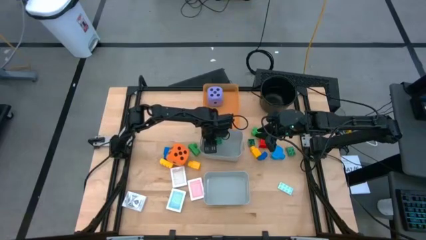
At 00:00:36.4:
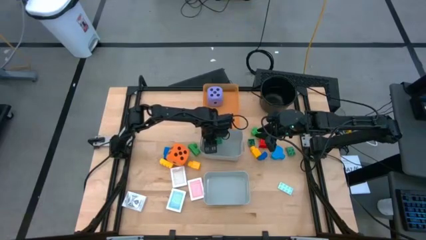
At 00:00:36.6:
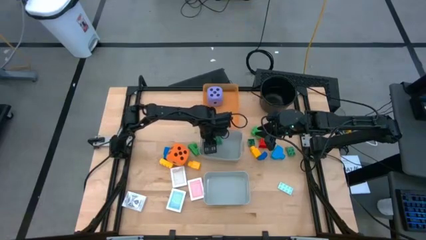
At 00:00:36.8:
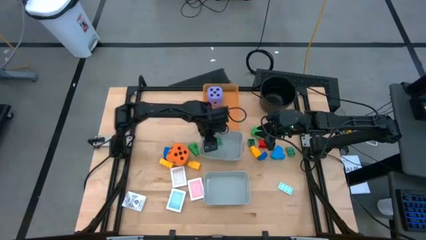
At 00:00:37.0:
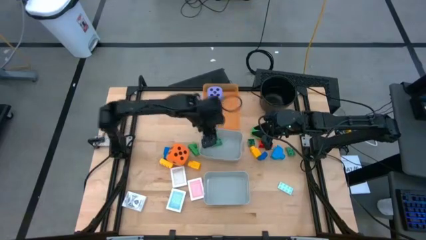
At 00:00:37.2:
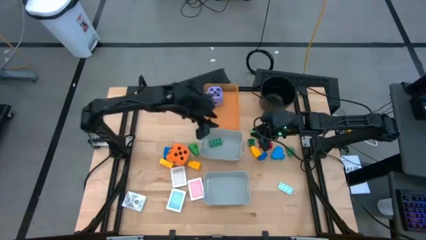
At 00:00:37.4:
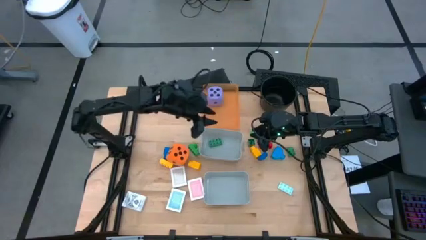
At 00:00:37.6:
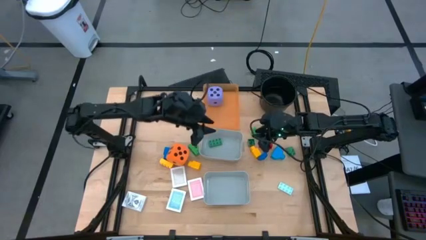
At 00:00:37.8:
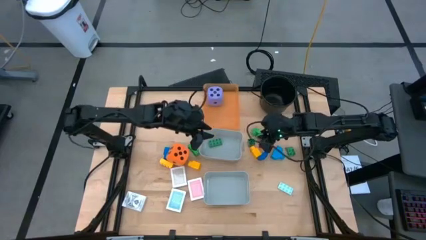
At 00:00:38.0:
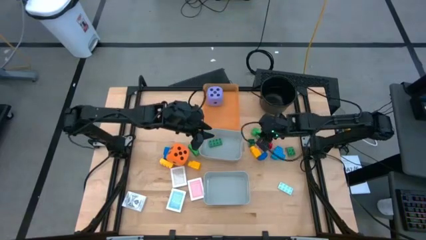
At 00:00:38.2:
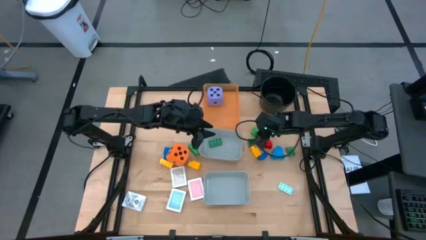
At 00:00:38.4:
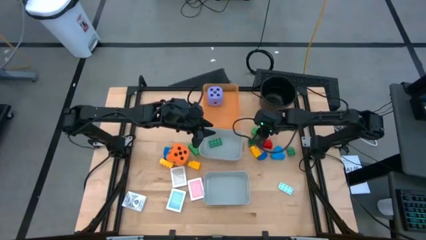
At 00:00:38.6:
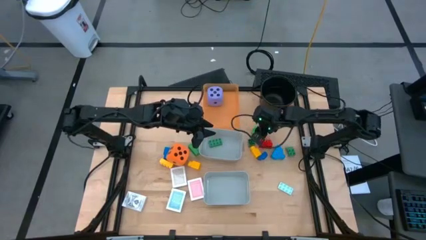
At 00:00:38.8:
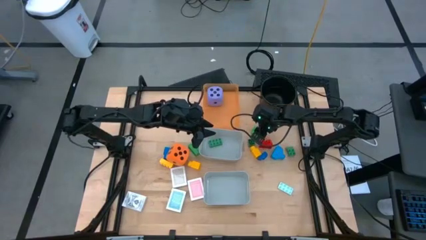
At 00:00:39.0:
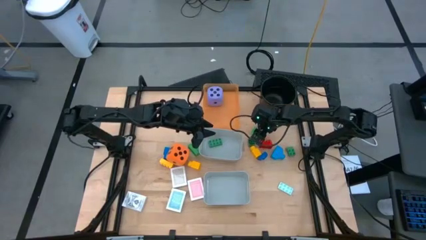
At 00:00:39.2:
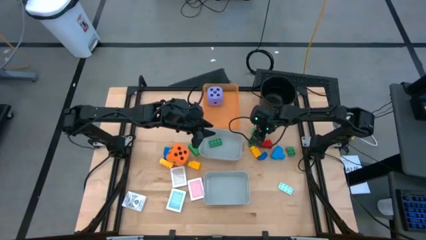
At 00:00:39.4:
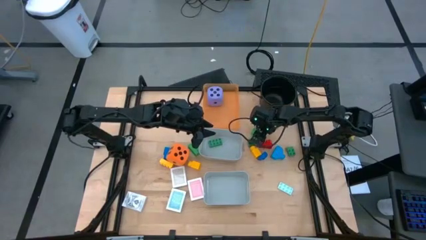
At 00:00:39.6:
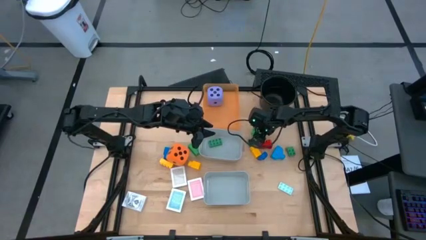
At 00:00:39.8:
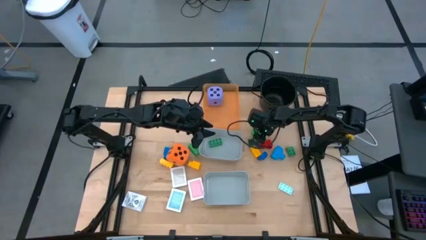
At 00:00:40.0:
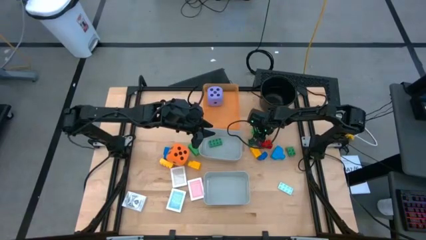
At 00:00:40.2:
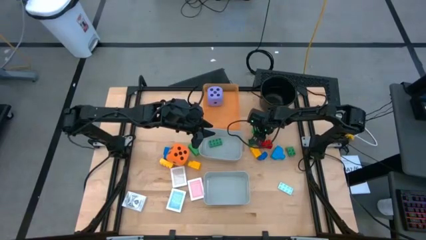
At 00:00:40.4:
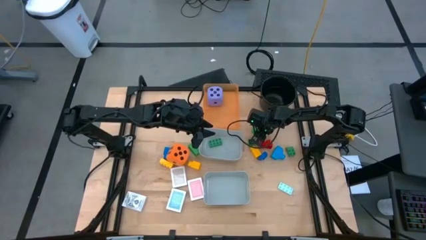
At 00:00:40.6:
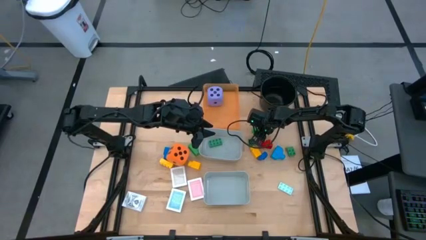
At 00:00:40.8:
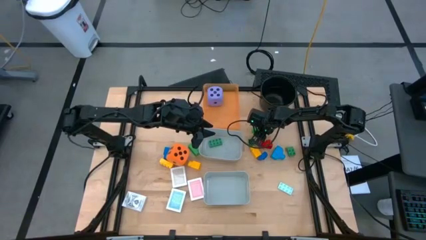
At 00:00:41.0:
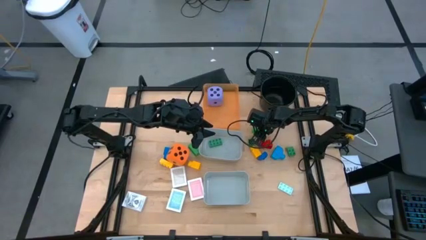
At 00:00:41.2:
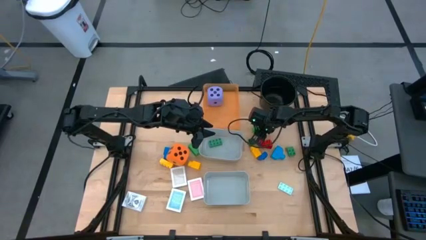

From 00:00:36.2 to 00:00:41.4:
Task: Pick & Place Toys
Put the green game piece into the top gray bin

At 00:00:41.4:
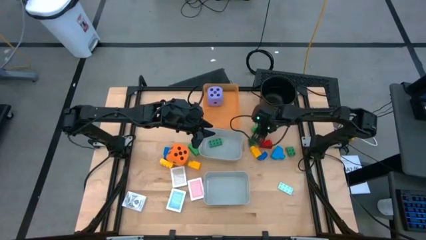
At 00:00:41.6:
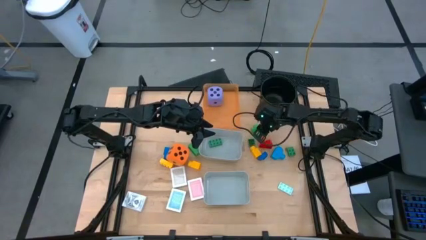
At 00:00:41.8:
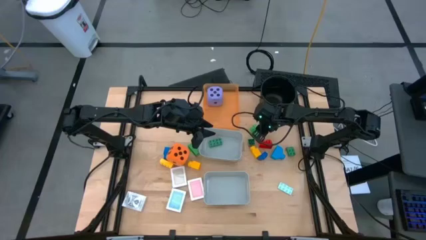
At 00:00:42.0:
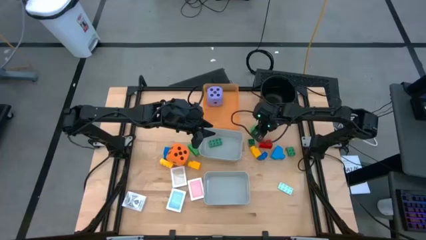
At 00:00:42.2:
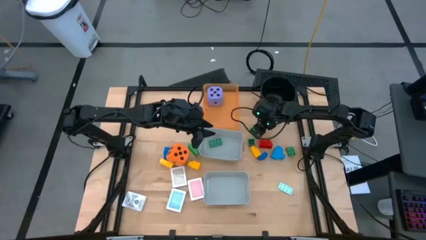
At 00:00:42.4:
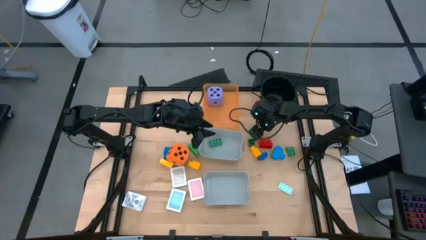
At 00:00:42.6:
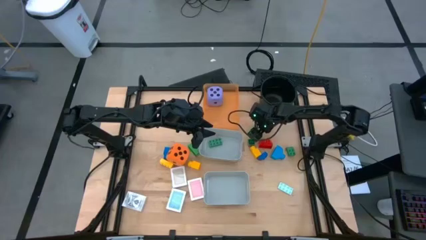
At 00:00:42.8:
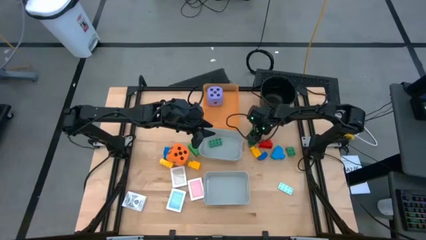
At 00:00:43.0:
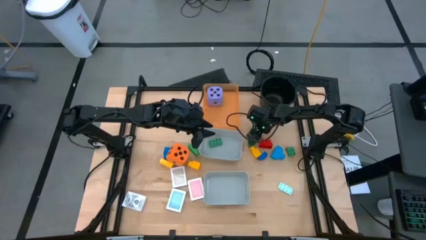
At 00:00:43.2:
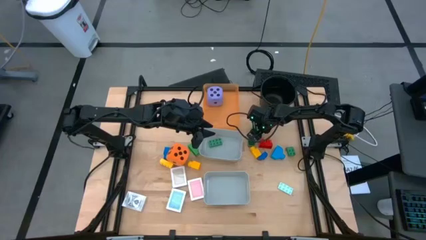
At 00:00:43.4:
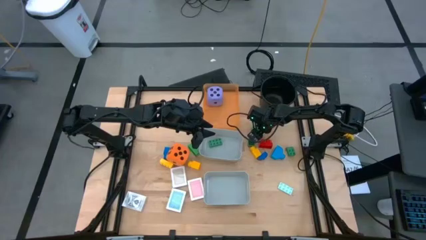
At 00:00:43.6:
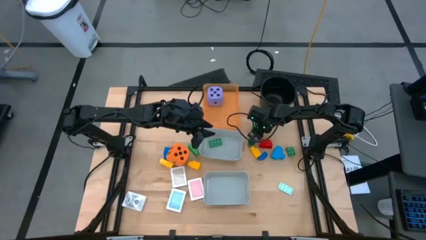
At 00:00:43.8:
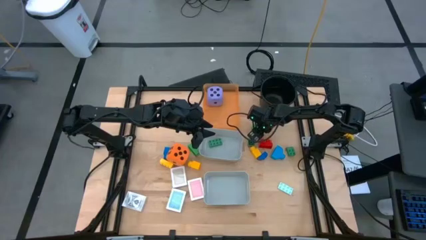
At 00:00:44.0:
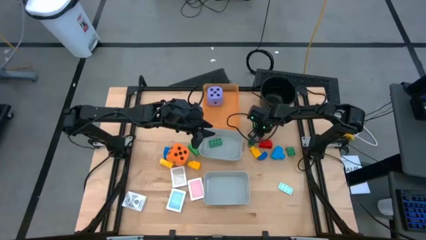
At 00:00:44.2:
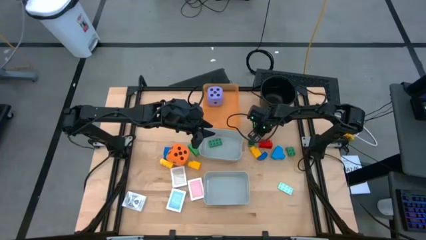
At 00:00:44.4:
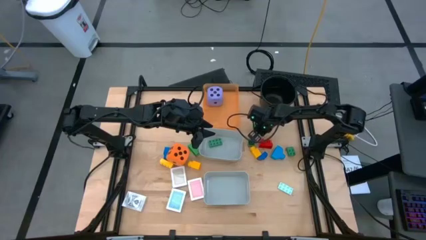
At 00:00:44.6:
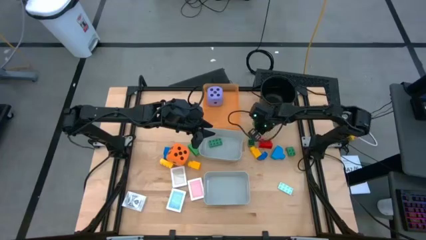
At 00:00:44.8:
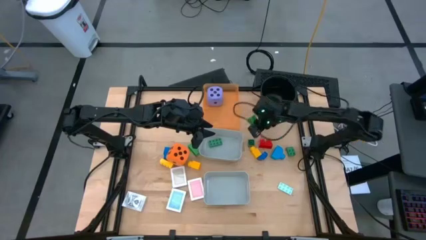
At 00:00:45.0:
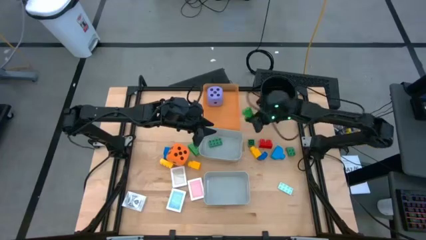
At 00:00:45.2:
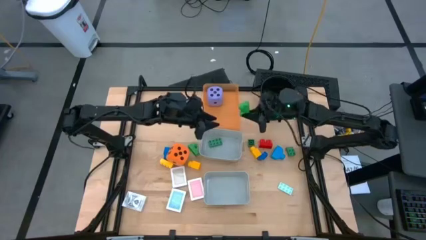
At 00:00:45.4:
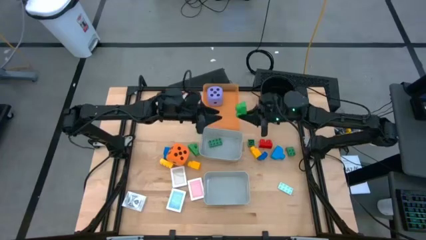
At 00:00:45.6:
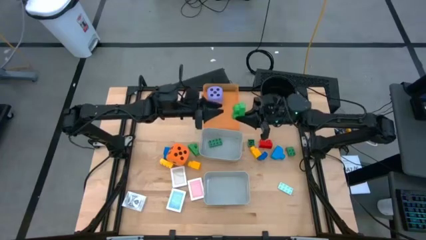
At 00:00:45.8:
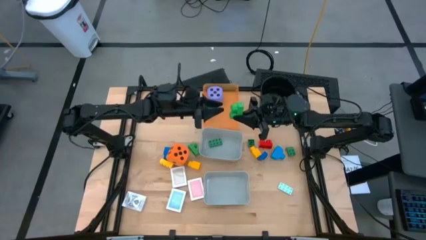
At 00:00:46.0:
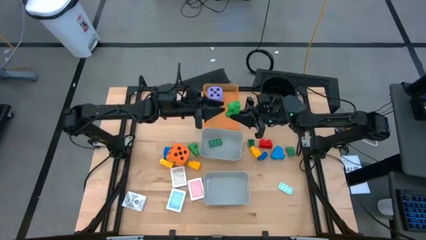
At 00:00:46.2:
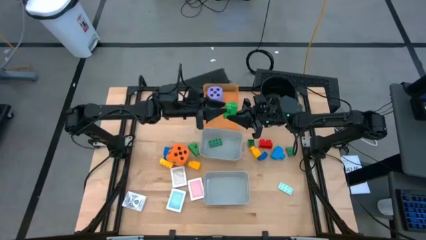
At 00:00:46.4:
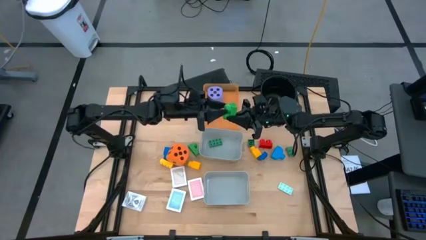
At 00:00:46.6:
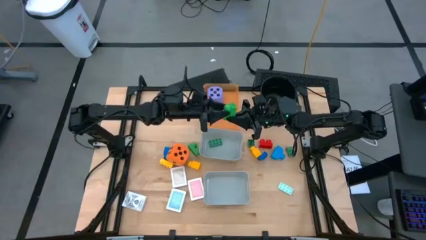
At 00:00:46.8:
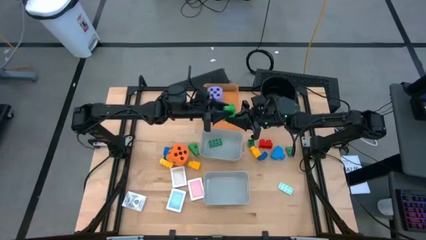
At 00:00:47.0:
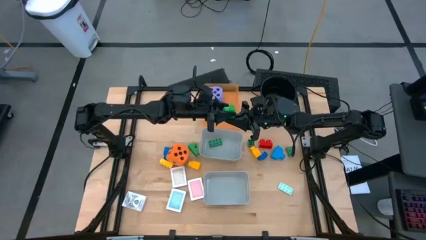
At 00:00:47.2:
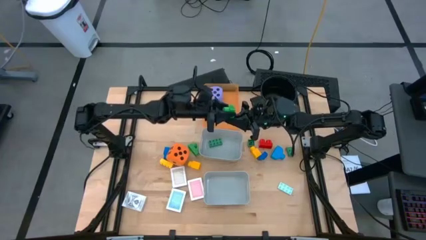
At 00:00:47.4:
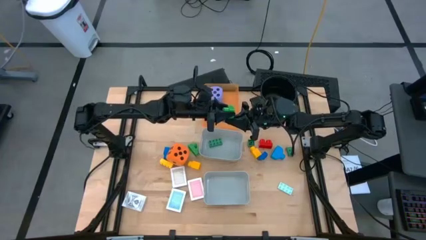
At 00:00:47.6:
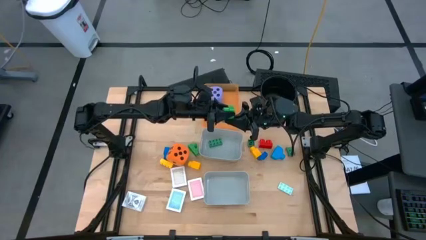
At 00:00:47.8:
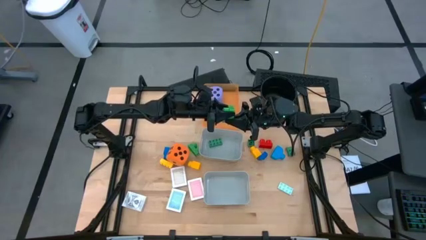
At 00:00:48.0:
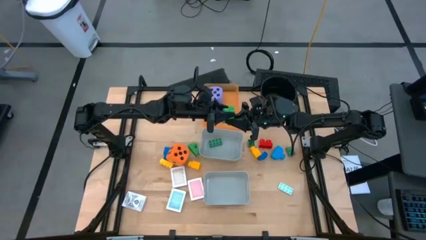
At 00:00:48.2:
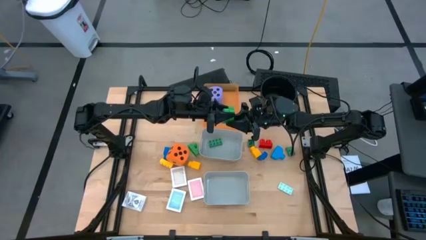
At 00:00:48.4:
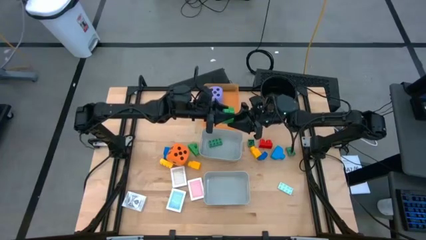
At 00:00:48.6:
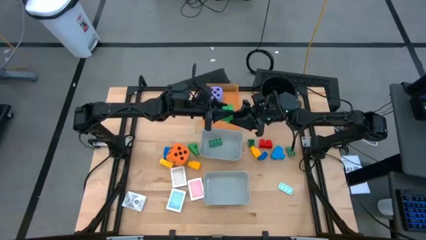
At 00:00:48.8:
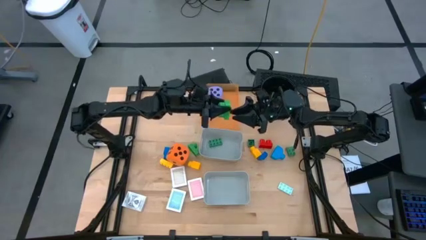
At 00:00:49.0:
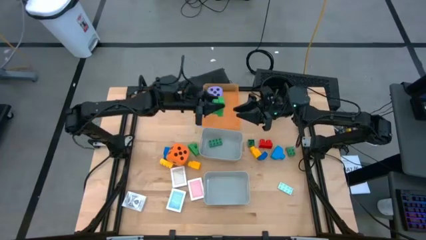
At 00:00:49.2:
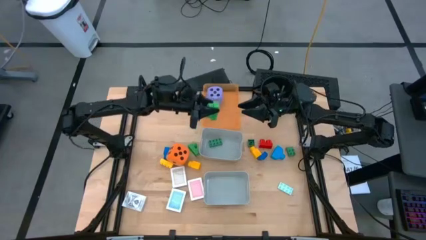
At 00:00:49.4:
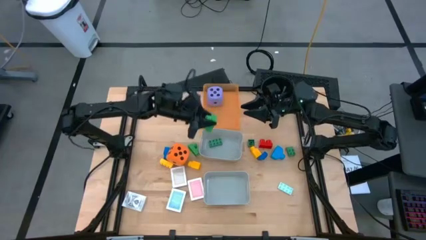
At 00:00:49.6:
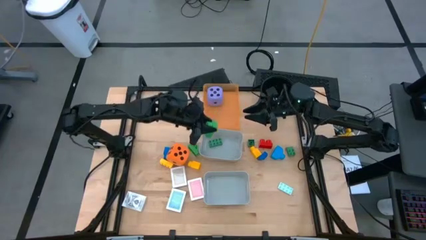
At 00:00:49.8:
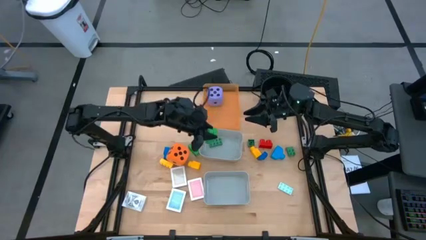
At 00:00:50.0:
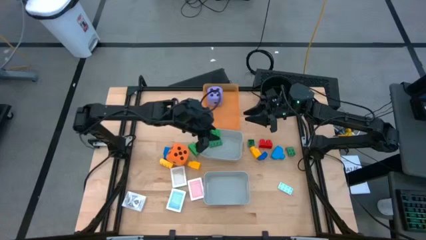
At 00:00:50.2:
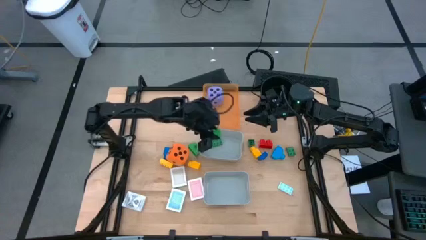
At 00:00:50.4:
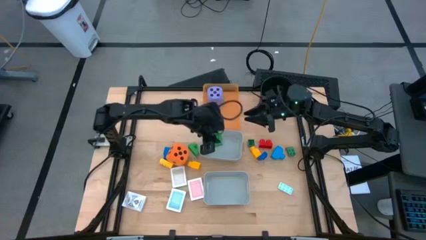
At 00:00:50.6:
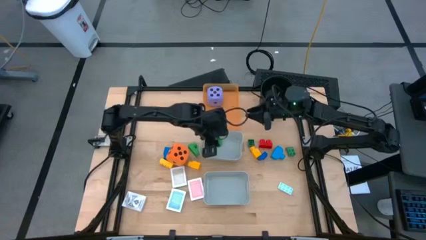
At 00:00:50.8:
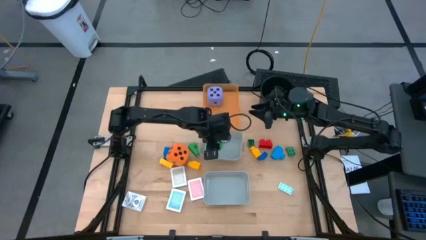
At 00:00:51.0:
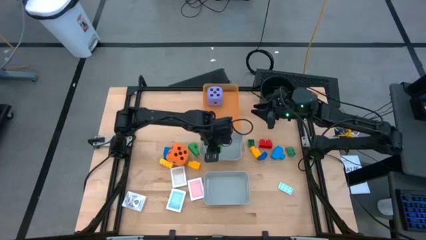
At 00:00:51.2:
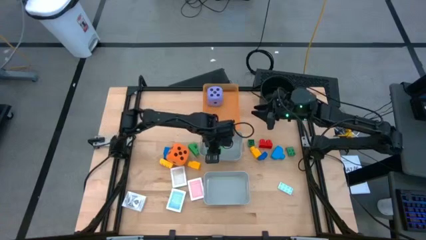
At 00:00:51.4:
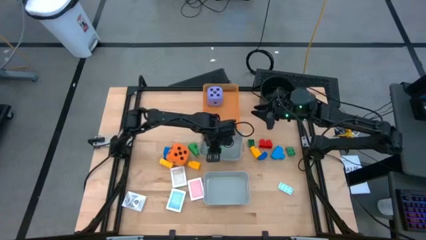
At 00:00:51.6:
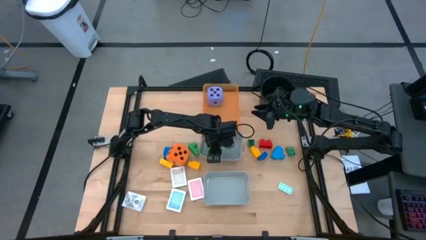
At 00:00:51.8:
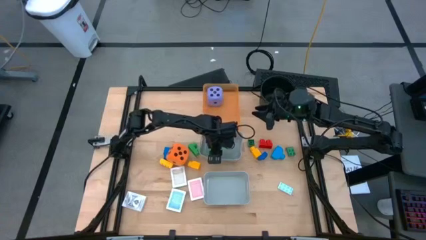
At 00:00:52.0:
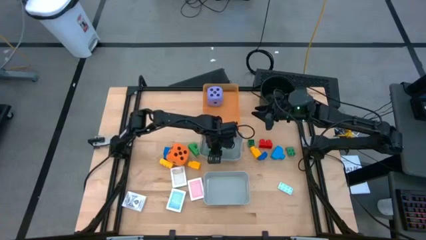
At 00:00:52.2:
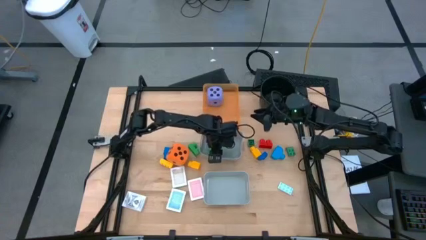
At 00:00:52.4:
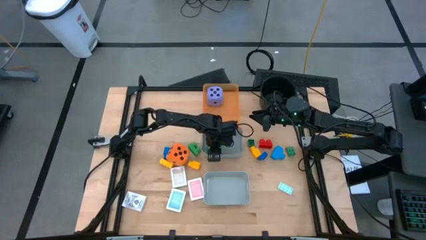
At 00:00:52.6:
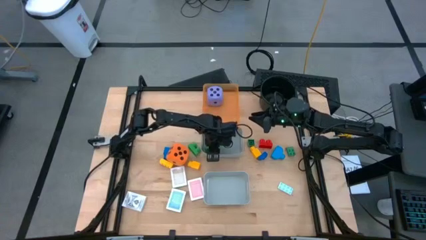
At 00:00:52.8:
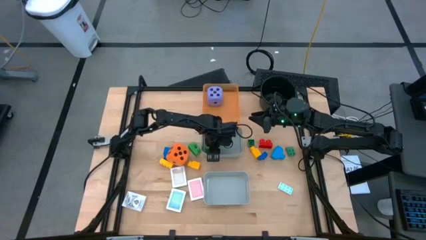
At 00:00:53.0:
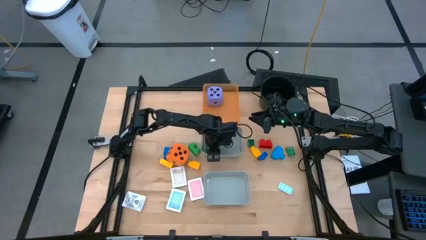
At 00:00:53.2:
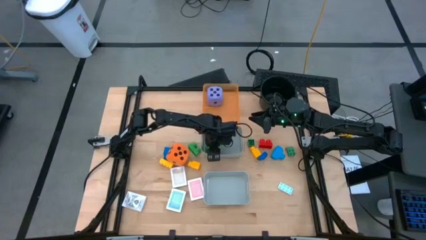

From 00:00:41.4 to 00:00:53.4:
Put the green game piece into the top gray bin
